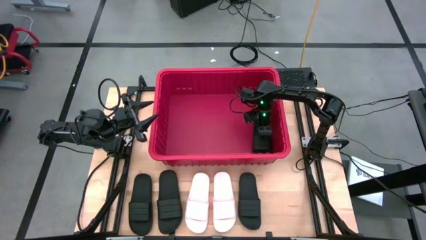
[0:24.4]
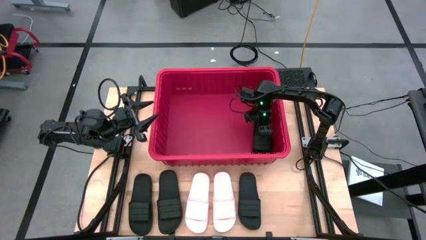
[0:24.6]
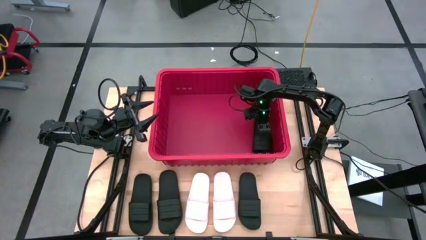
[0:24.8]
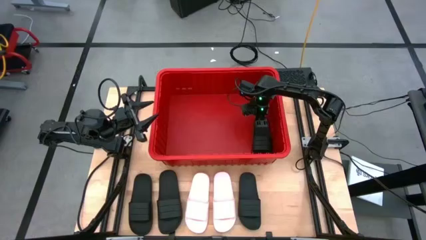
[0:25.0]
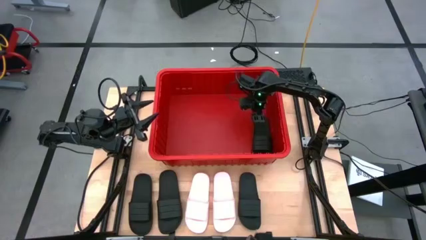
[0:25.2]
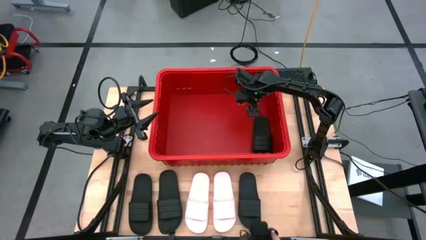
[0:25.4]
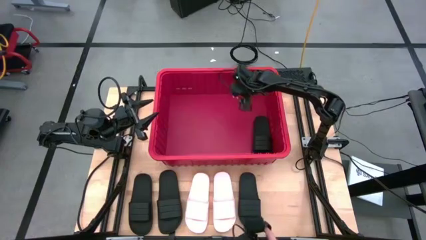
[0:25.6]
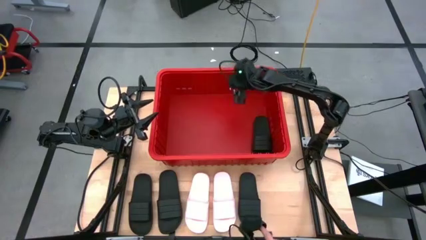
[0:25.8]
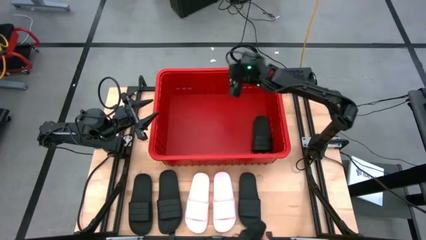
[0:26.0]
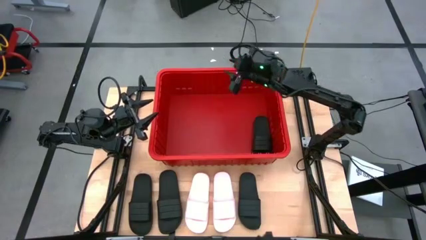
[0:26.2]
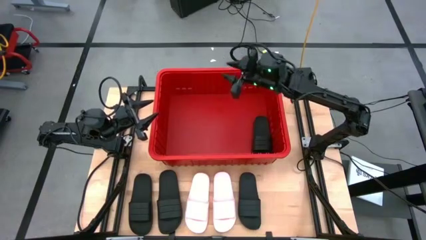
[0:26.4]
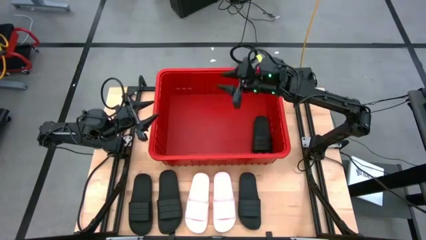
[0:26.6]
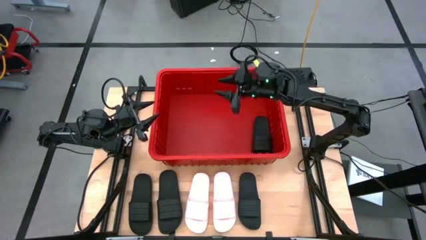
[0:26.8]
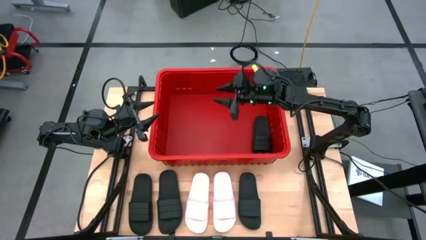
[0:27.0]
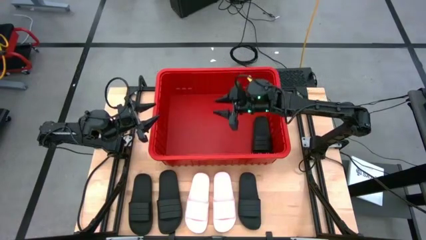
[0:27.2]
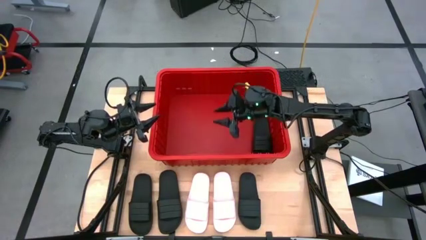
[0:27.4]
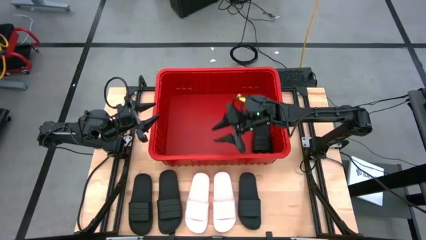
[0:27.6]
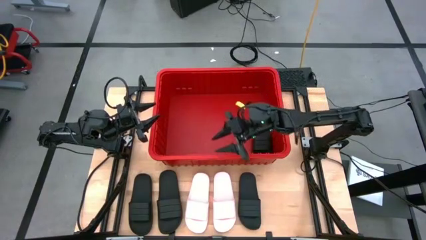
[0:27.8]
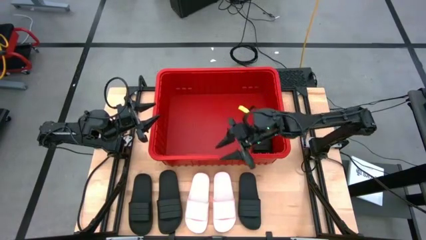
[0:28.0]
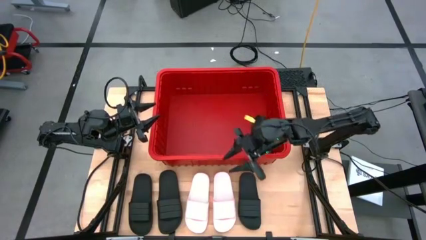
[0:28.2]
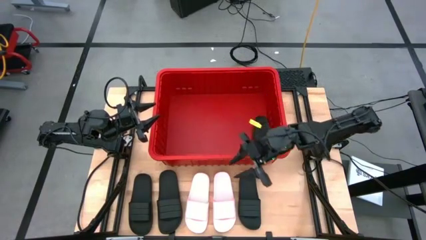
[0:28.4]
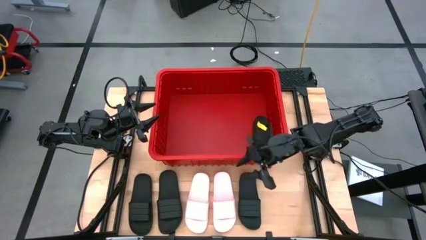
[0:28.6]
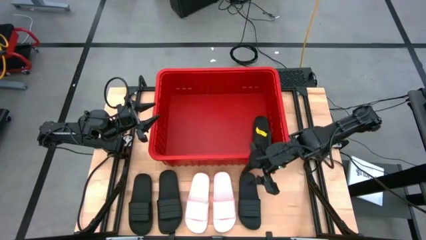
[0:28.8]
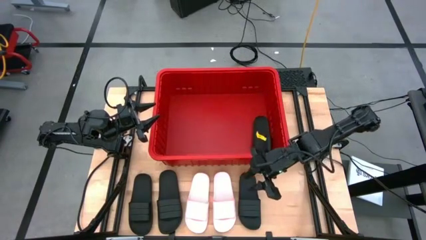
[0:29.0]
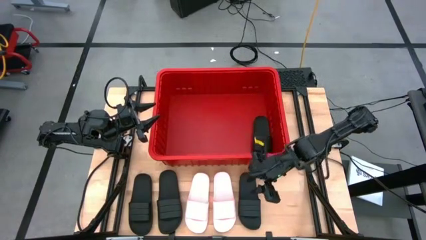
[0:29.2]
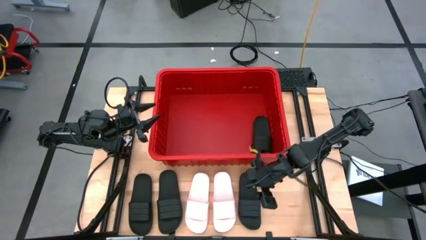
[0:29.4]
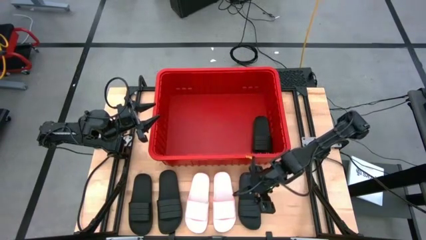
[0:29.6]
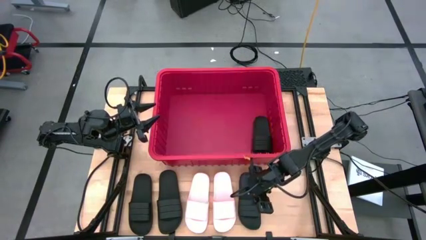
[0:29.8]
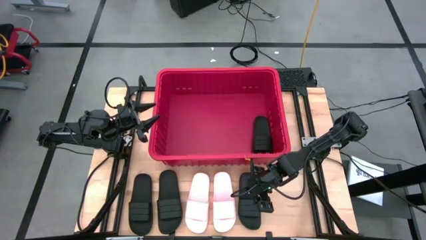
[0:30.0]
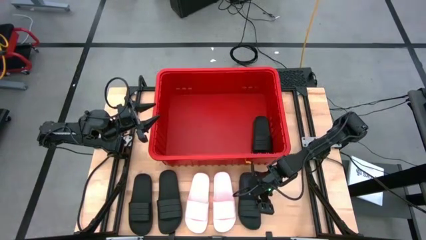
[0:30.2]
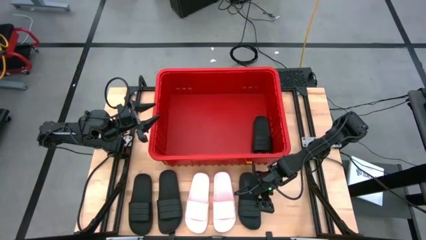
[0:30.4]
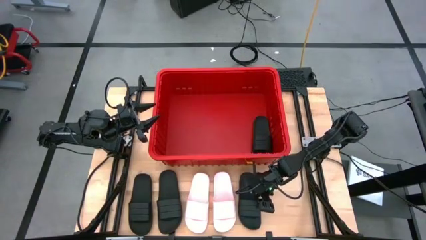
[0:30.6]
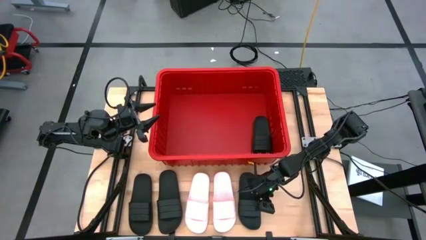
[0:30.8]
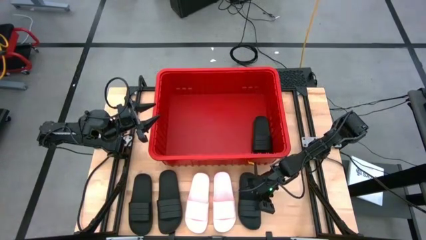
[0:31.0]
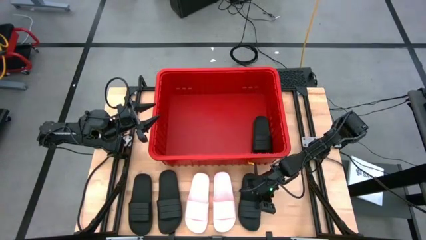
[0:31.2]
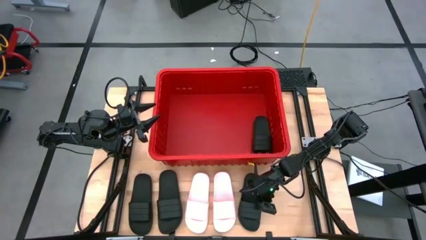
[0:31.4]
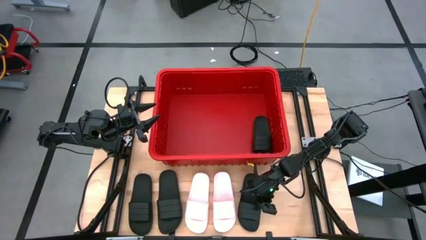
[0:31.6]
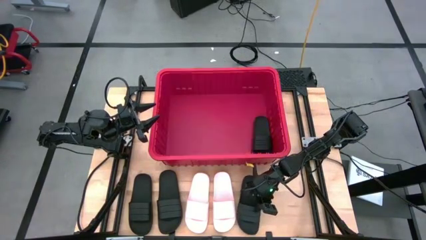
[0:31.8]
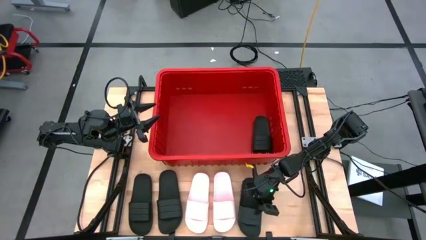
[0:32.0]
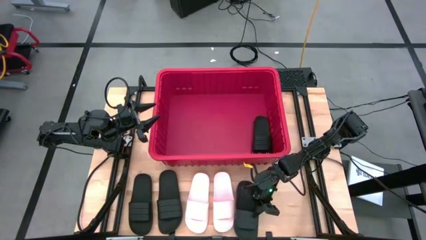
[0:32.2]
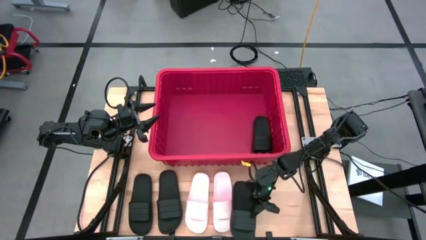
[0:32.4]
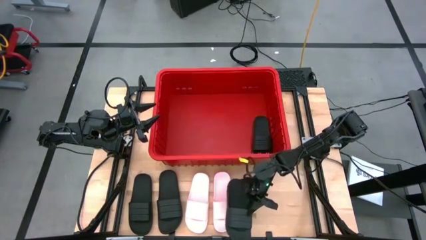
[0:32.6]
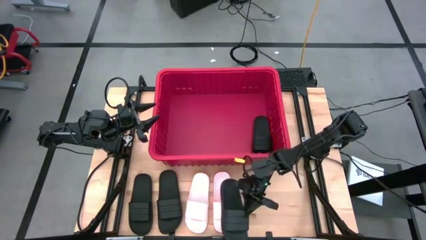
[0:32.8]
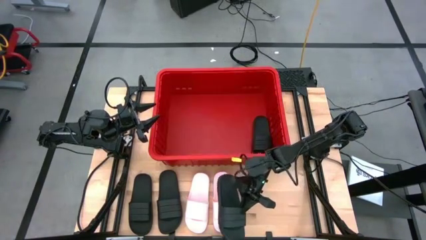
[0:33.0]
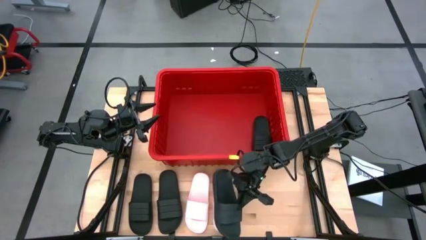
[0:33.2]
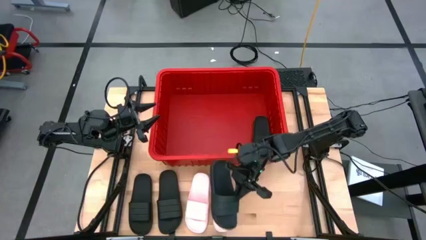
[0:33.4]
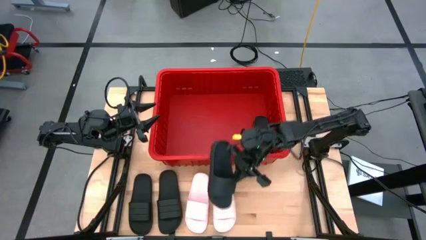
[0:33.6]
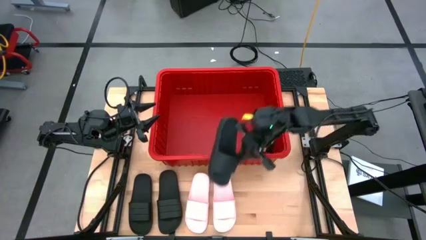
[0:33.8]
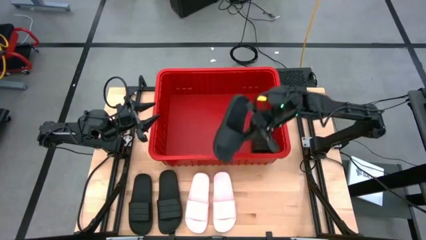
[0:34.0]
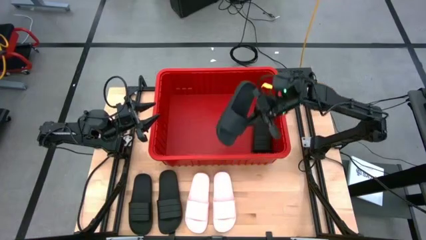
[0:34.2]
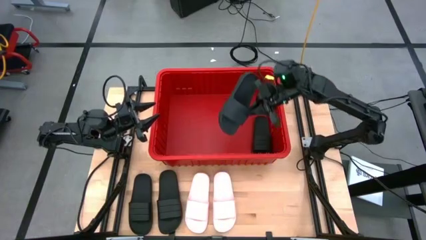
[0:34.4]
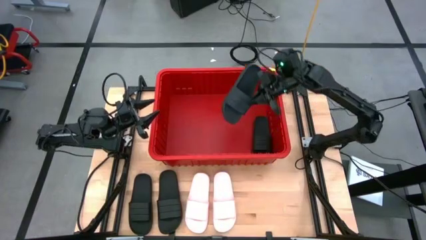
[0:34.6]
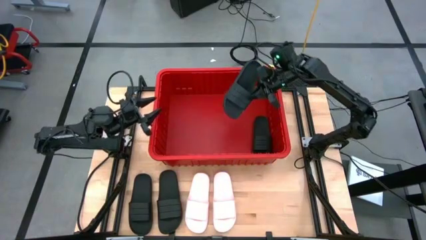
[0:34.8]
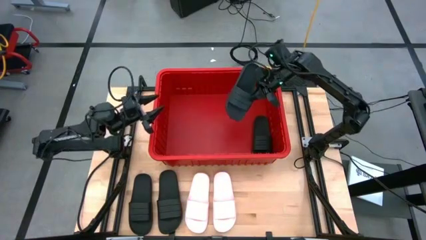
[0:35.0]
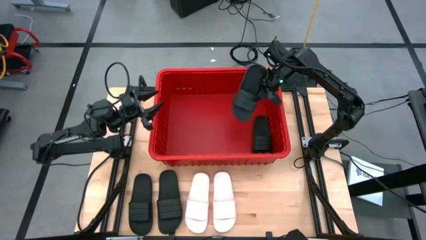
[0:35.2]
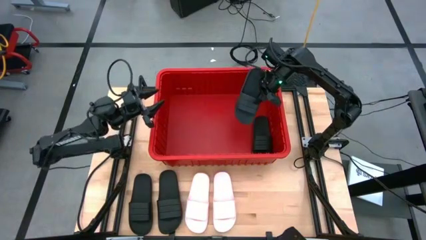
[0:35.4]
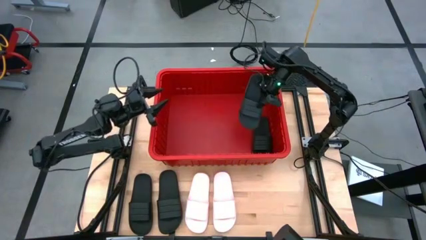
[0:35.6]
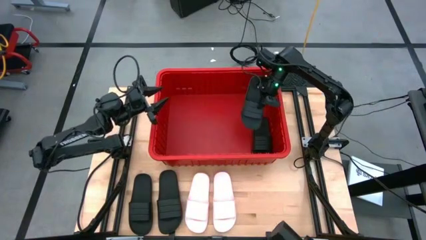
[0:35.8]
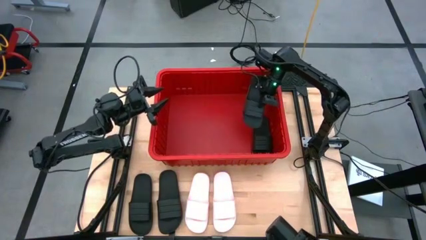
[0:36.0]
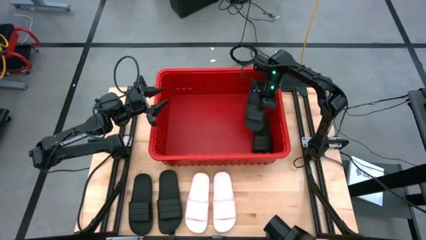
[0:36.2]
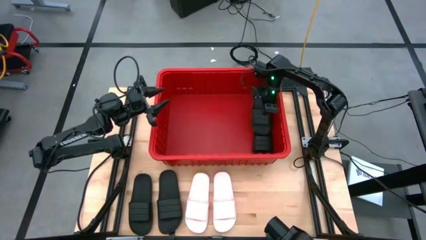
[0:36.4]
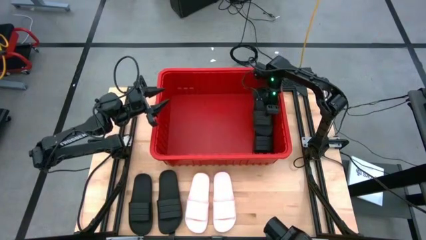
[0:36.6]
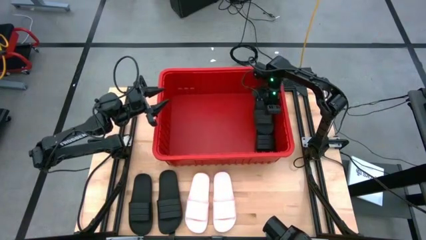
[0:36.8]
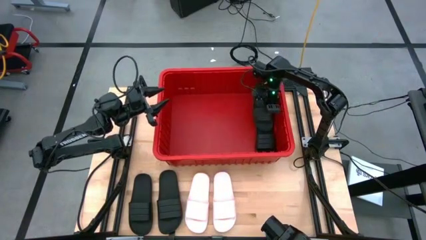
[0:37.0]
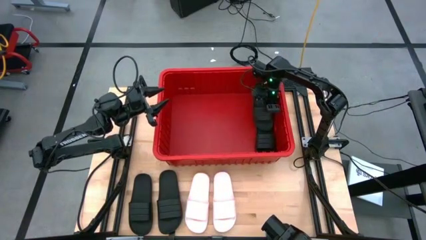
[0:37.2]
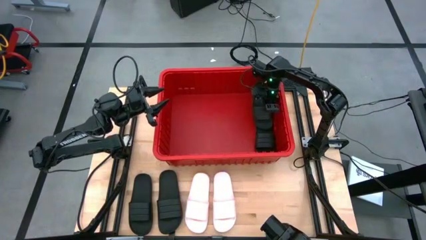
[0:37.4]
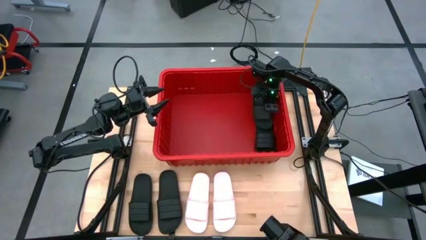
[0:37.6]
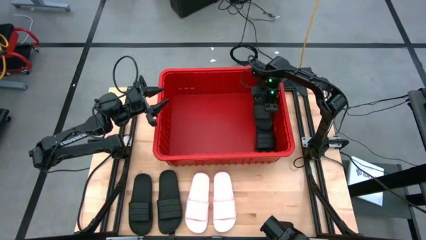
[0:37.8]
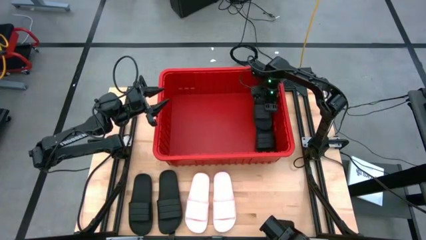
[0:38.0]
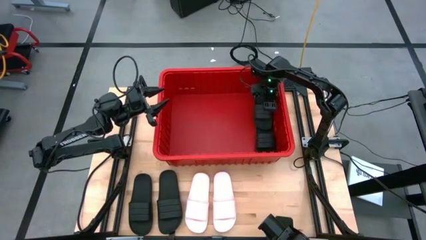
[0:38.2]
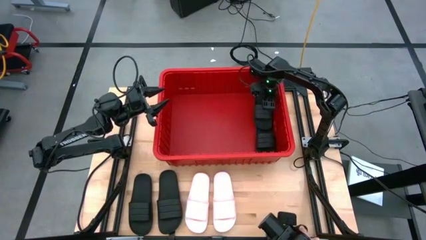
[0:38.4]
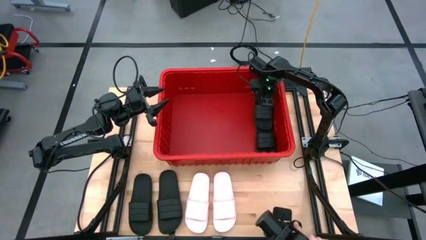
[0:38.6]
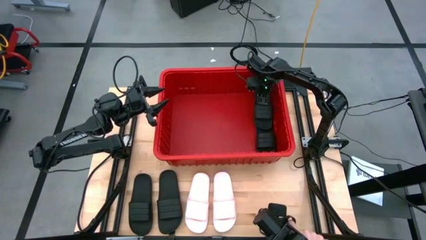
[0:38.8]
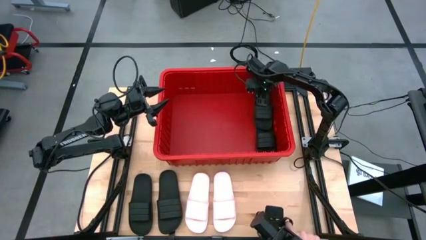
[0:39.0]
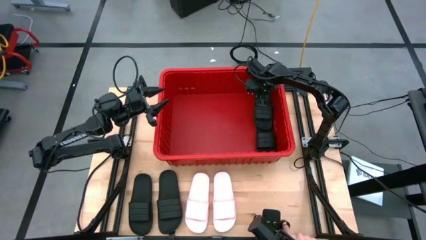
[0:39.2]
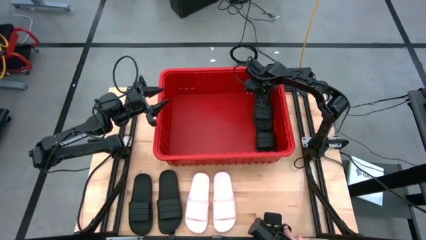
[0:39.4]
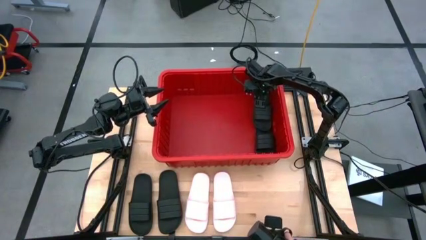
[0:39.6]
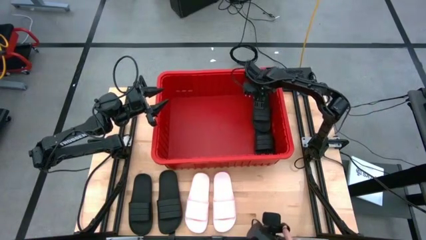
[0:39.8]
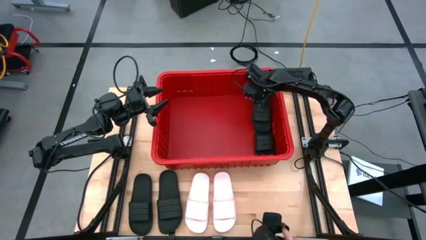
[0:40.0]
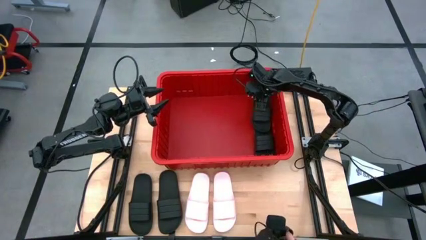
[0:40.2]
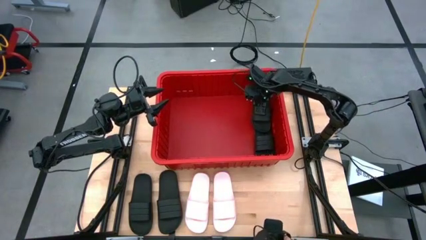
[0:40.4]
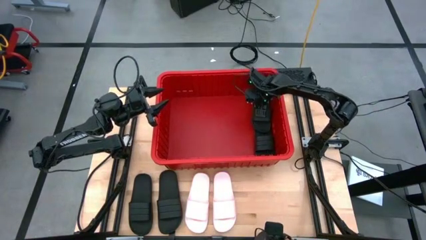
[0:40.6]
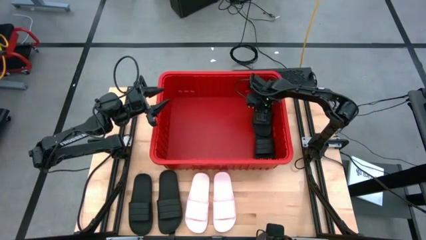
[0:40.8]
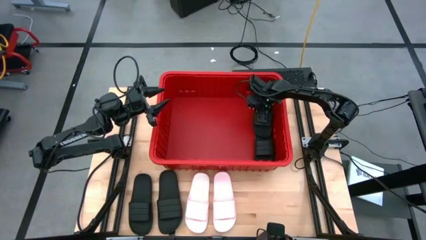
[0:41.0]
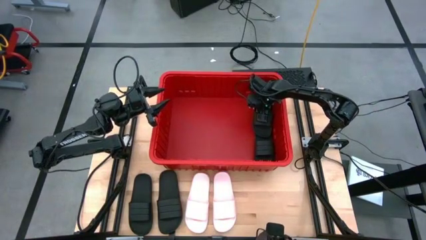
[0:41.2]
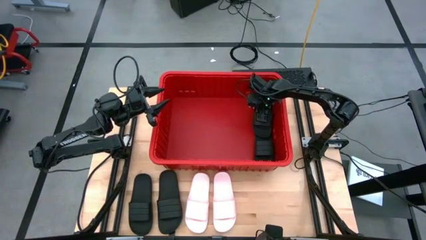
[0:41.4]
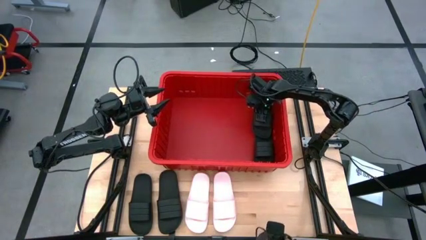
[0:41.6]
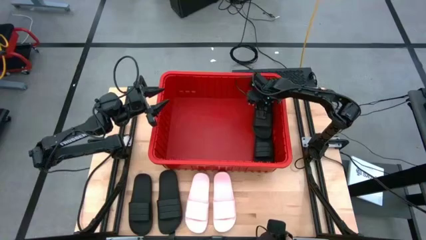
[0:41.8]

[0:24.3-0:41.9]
Task: Pick and place slides into bin
Put the black slide into the red container
